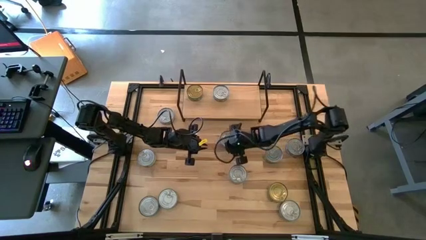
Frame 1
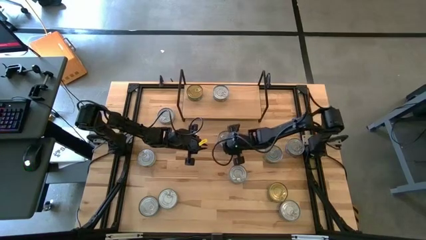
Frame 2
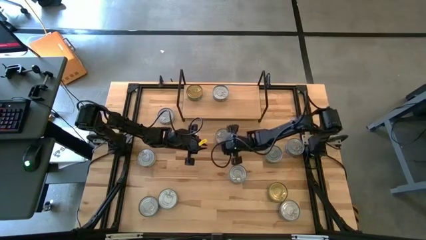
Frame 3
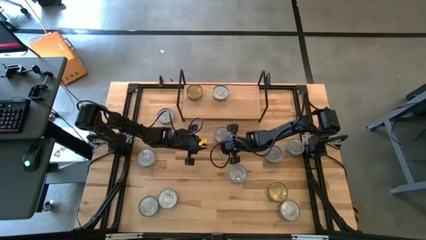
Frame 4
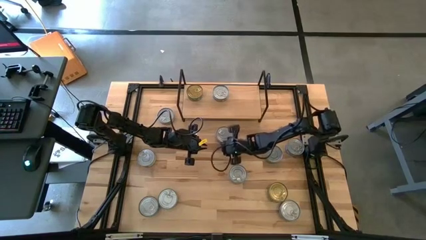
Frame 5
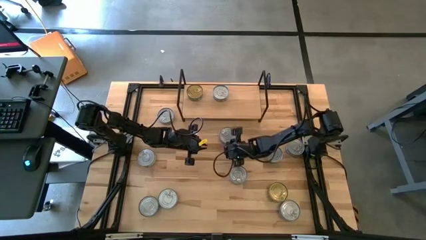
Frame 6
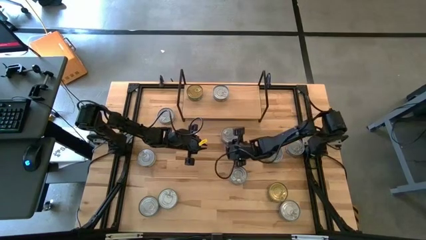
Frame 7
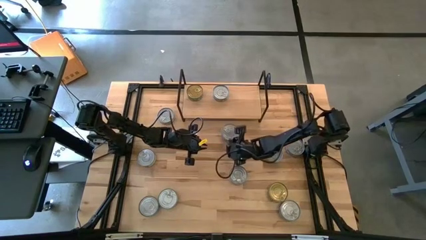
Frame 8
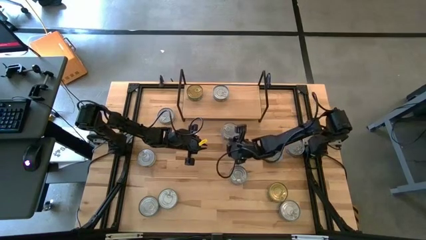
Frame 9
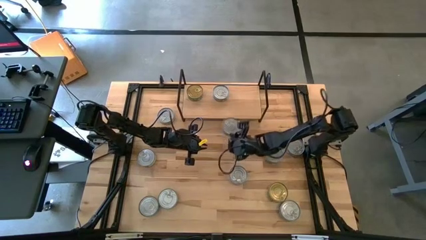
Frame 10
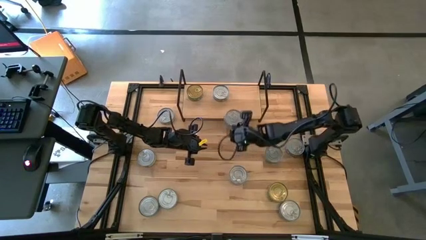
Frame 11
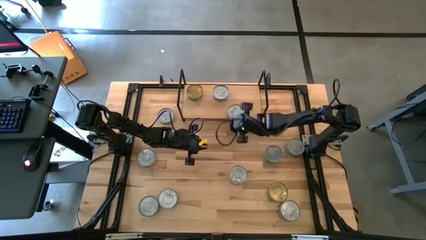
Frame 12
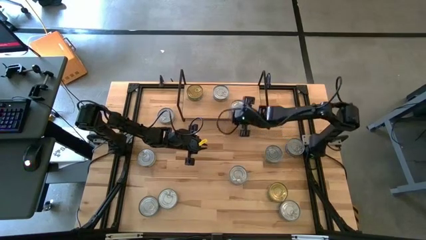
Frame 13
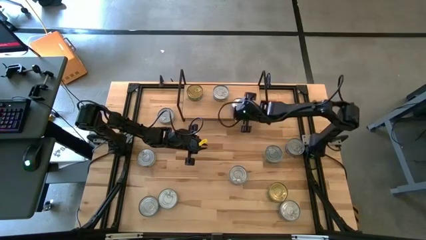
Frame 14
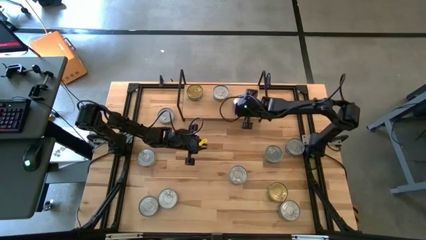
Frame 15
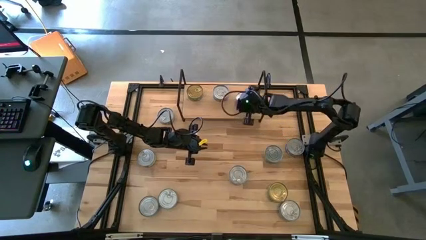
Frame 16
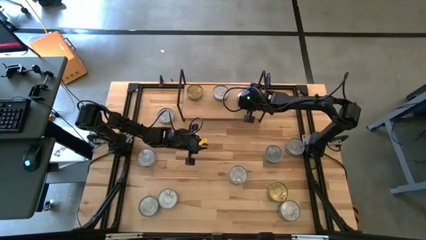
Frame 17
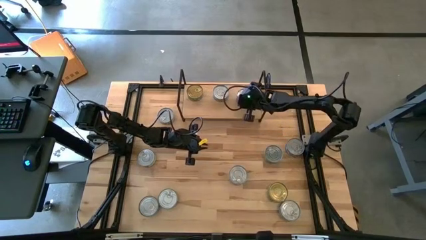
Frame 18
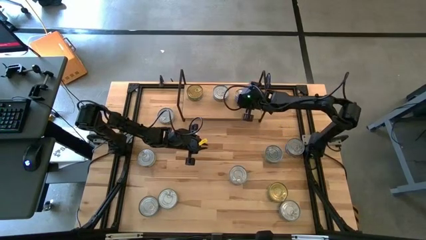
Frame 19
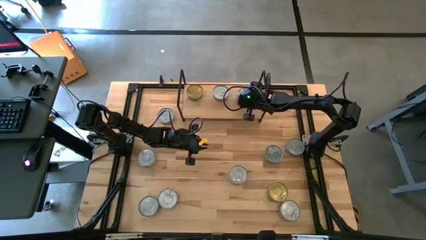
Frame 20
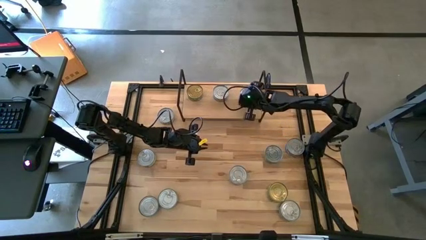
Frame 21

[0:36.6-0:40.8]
Task: Stack canned seafood by type on shelf
Put the blue tuna can on the shelf

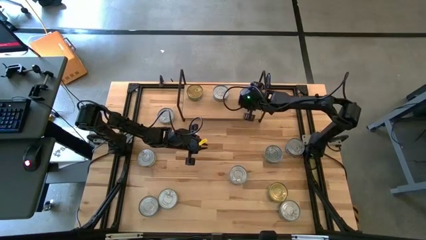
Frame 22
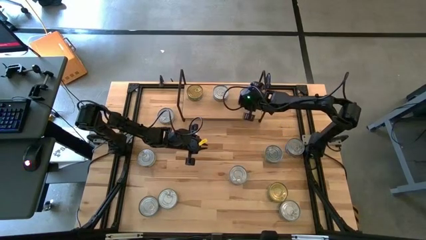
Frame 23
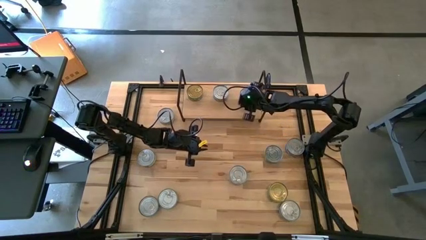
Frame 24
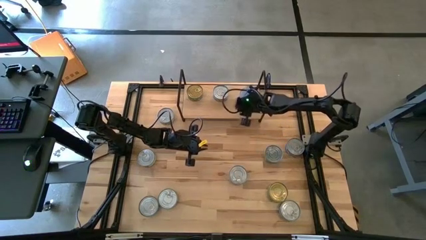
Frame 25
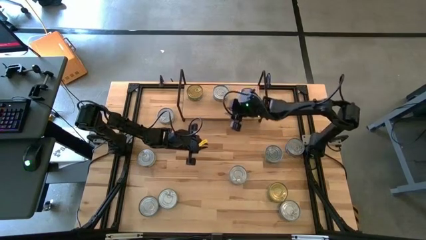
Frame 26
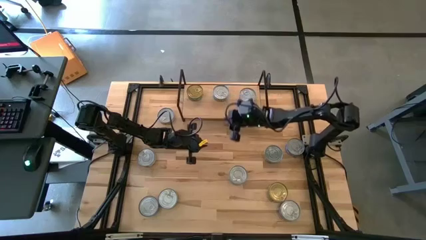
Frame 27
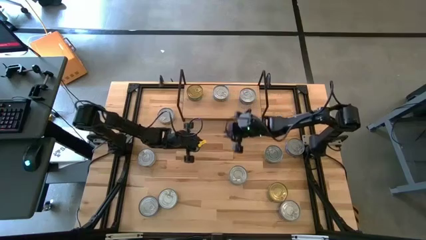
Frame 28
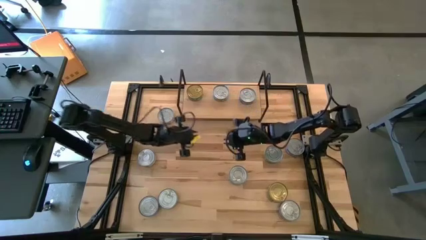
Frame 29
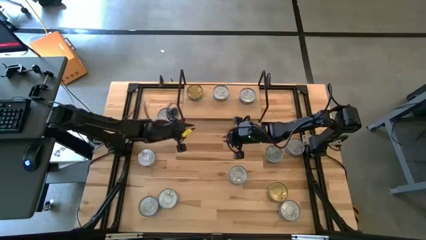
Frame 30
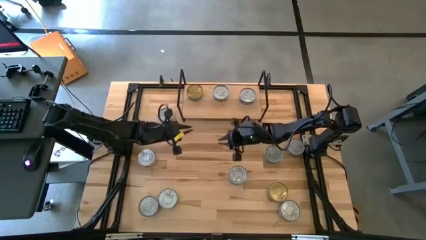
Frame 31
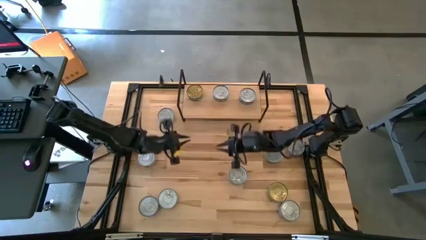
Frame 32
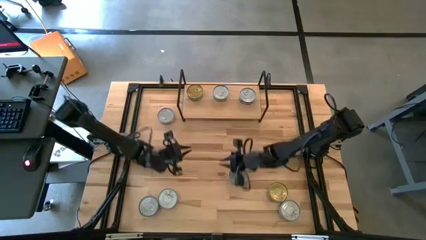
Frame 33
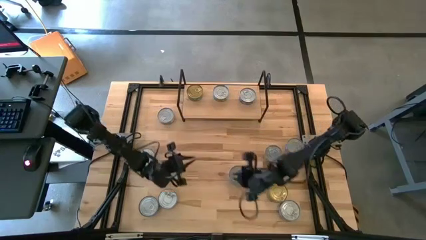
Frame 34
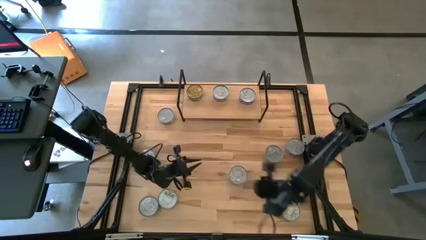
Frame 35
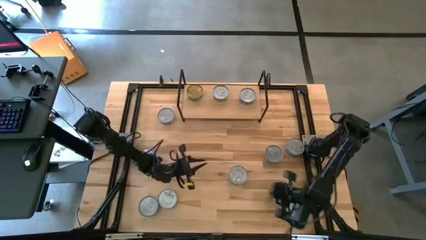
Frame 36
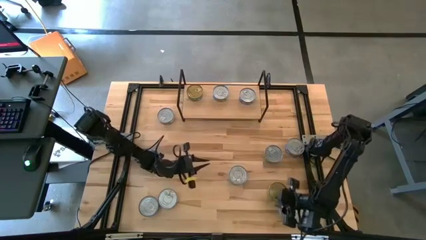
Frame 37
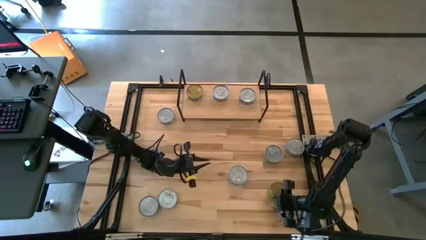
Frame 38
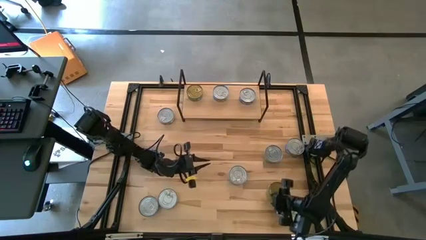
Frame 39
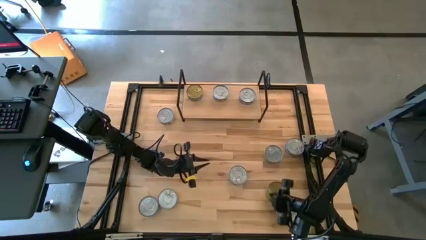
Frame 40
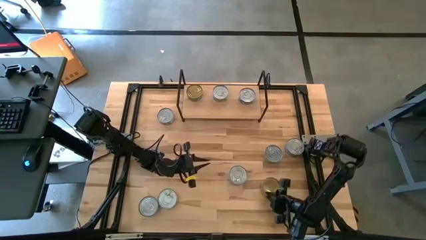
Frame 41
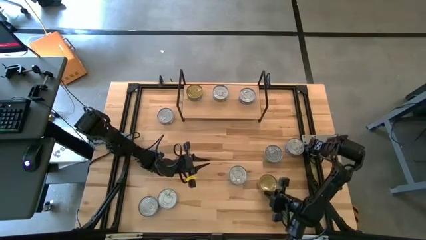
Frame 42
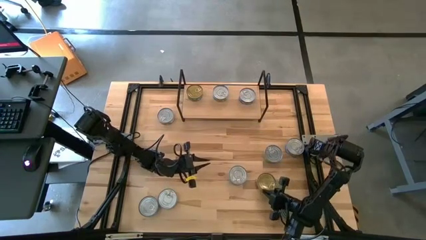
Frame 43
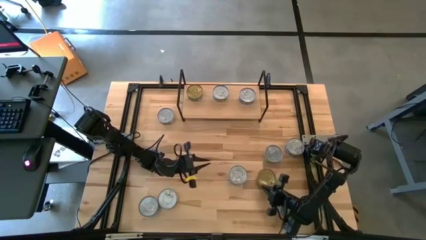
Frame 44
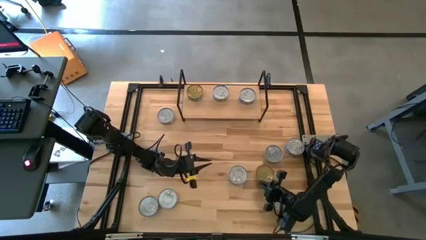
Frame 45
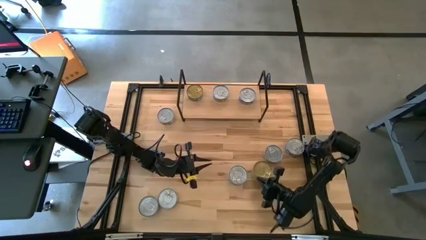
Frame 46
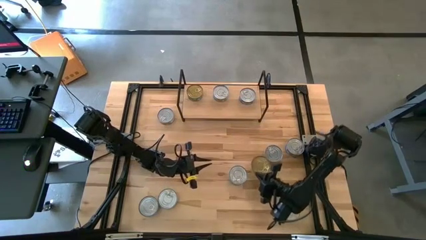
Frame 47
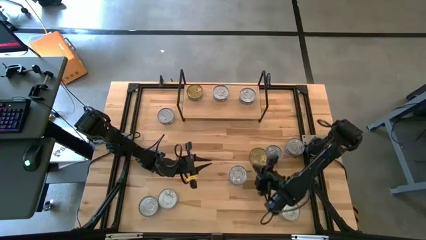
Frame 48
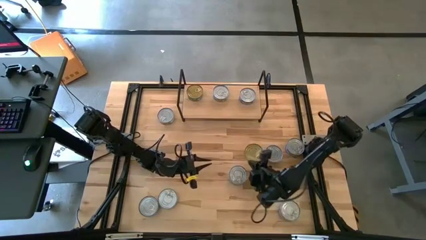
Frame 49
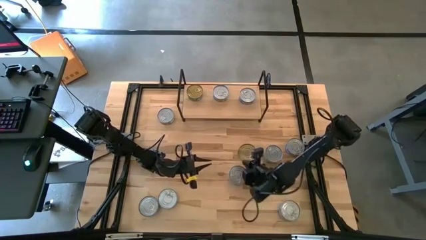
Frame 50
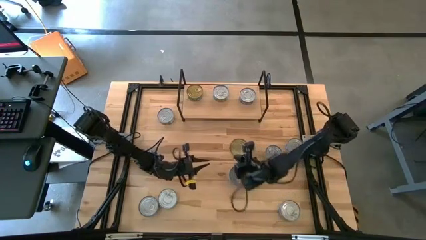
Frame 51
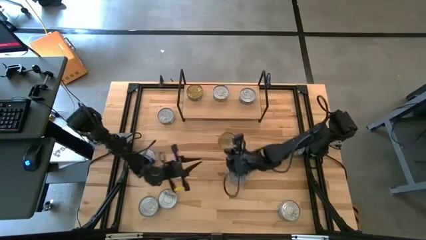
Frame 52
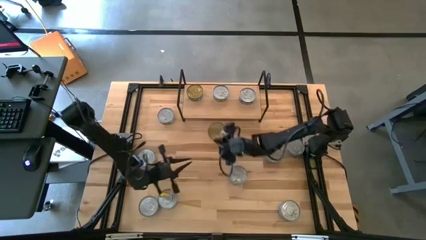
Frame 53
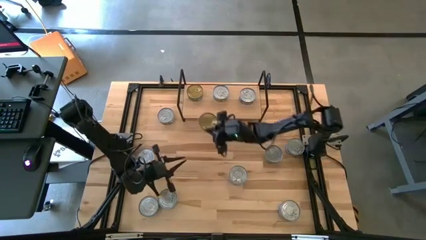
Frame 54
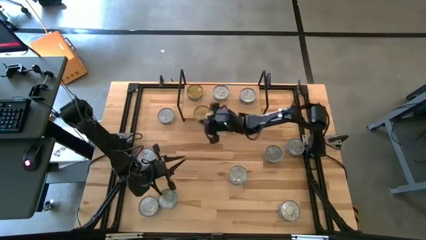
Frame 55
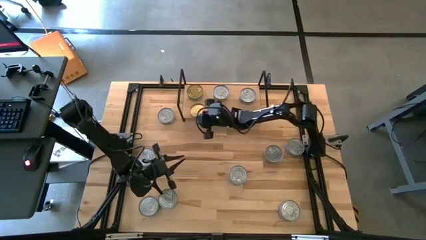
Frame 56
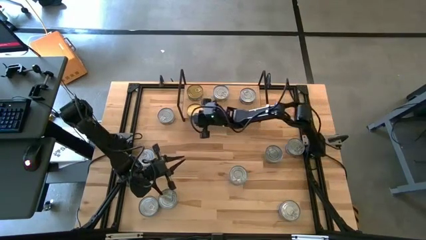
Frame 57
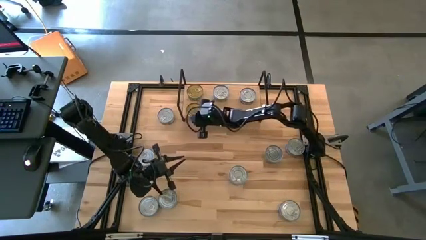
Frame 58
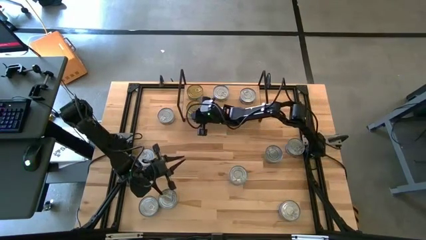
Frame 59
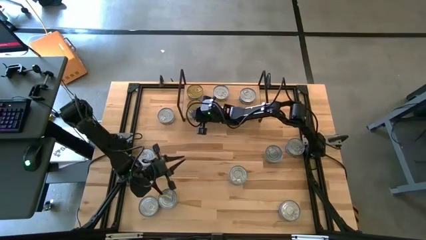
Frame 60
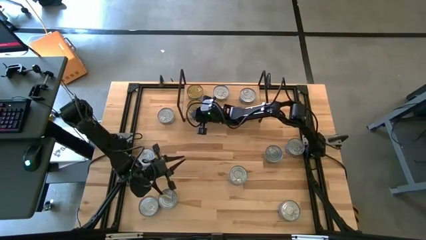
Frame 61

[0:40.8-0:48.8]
Put the green tuna can aligned with the other green tuna can on the shelf
